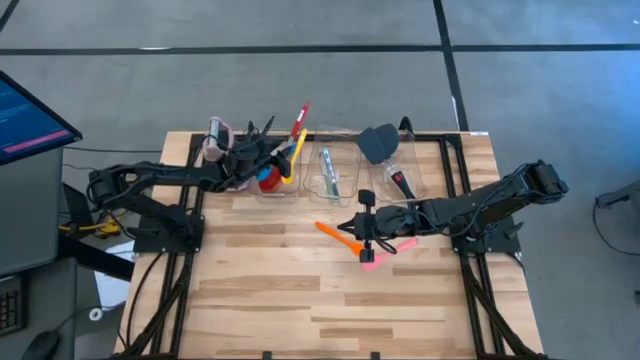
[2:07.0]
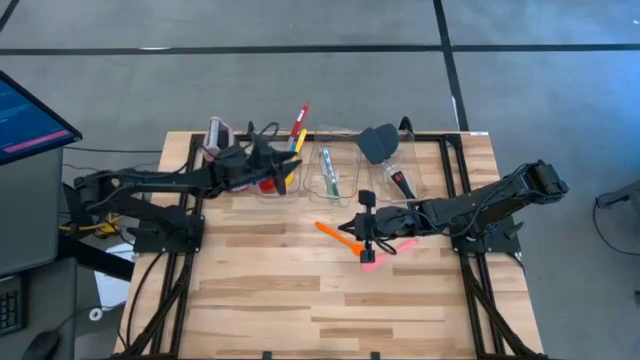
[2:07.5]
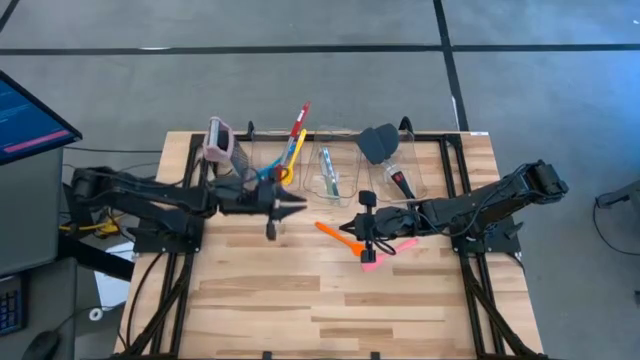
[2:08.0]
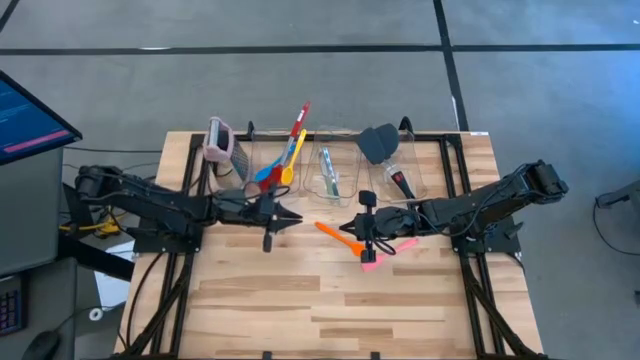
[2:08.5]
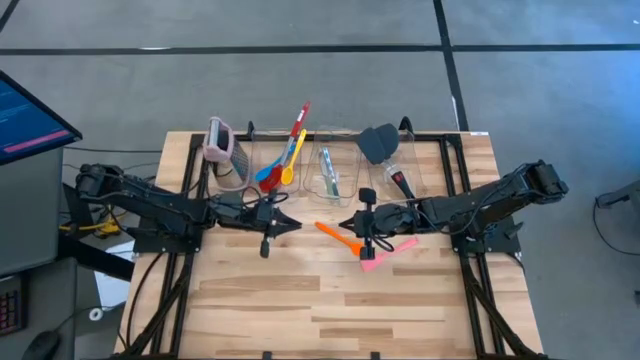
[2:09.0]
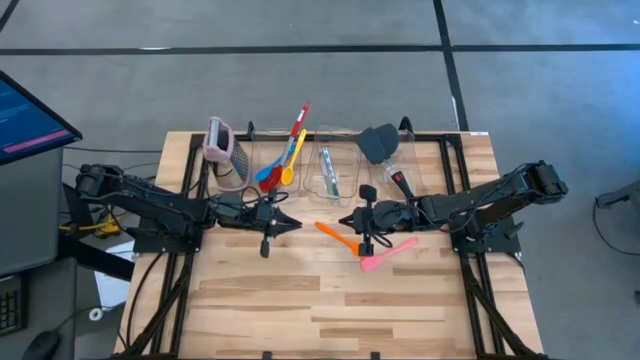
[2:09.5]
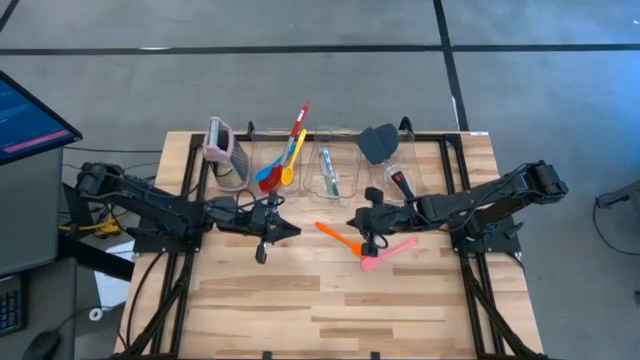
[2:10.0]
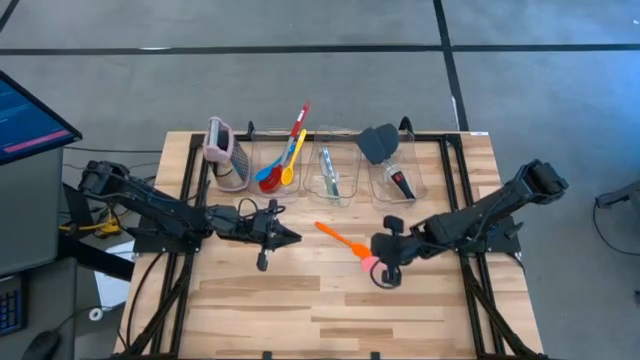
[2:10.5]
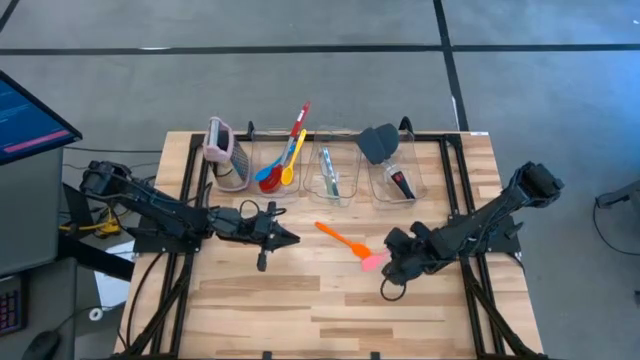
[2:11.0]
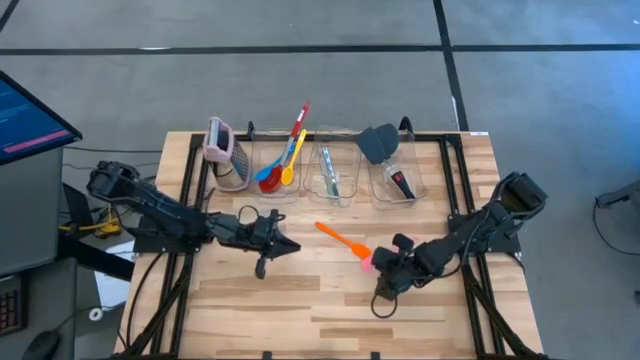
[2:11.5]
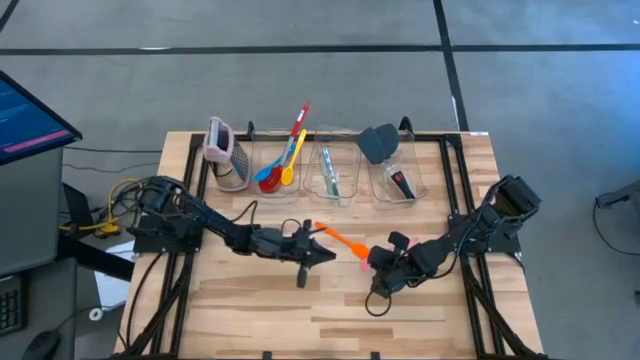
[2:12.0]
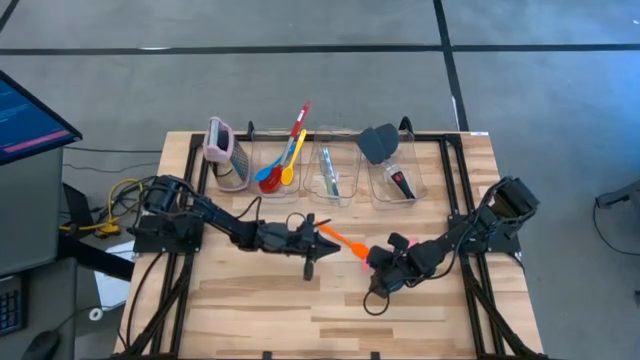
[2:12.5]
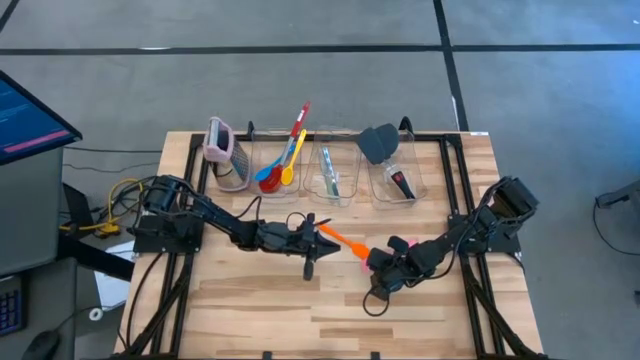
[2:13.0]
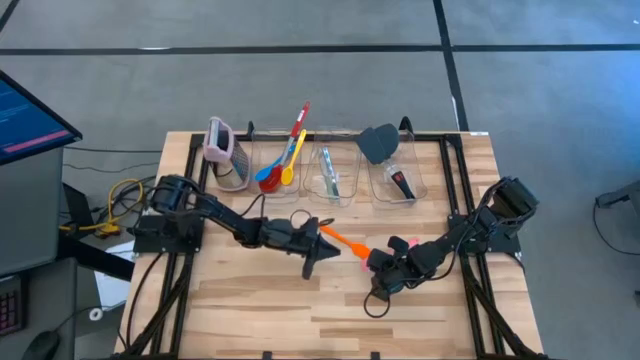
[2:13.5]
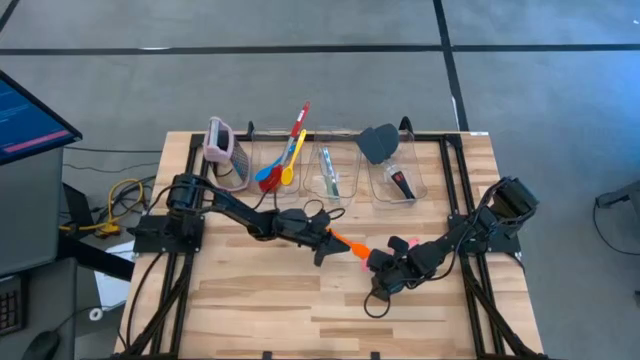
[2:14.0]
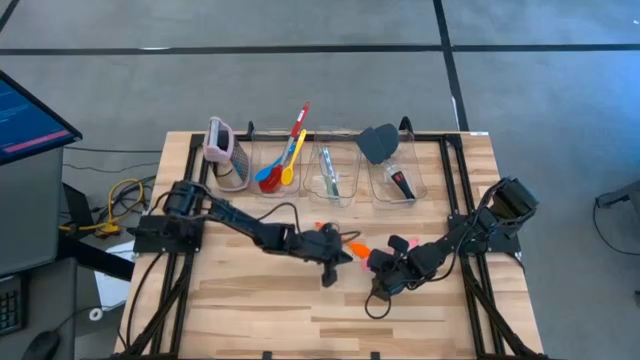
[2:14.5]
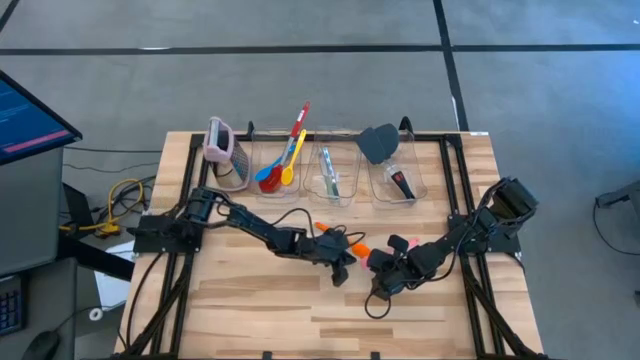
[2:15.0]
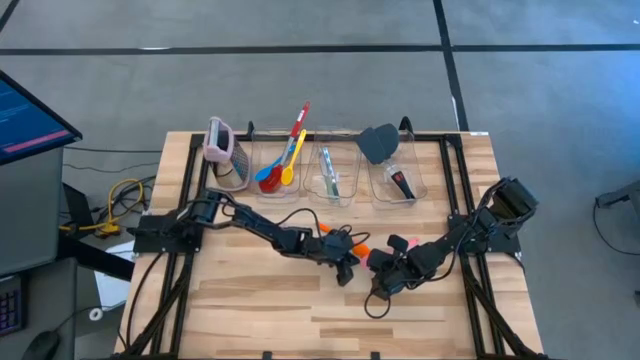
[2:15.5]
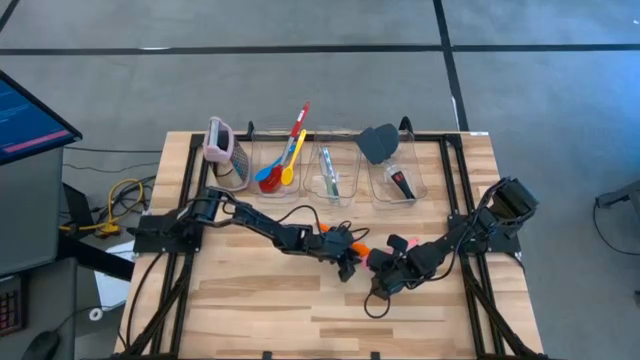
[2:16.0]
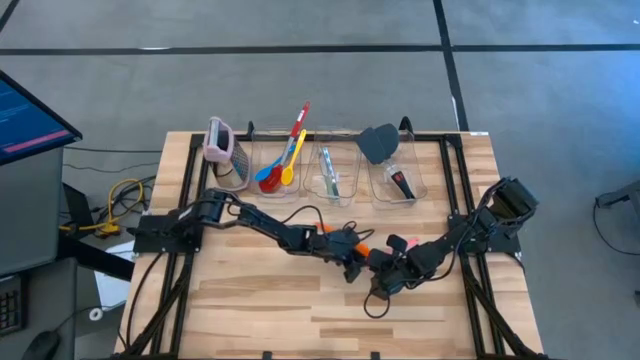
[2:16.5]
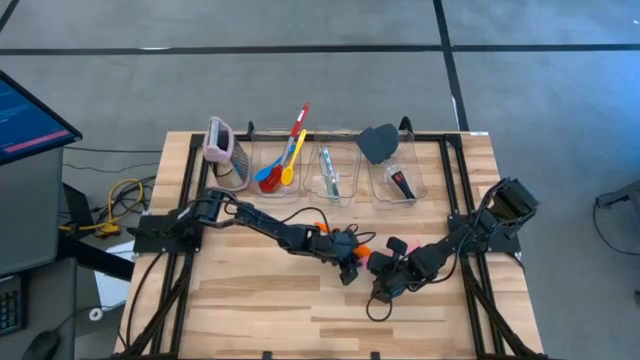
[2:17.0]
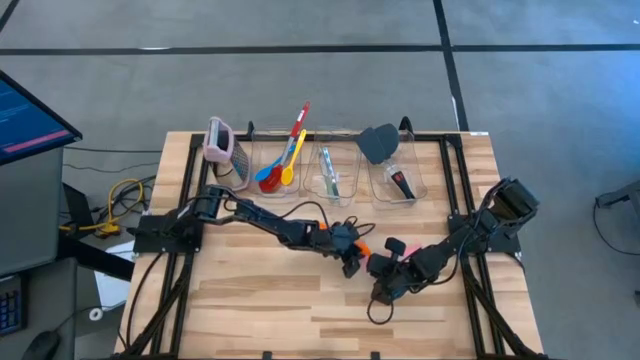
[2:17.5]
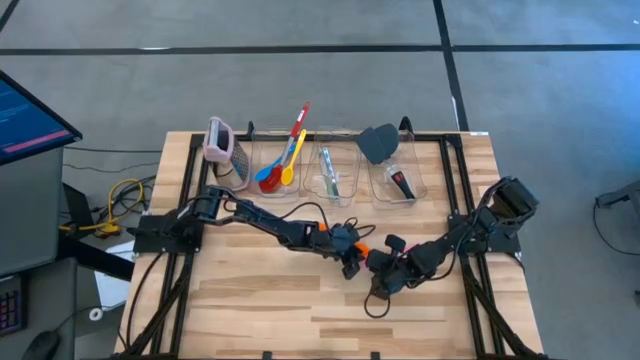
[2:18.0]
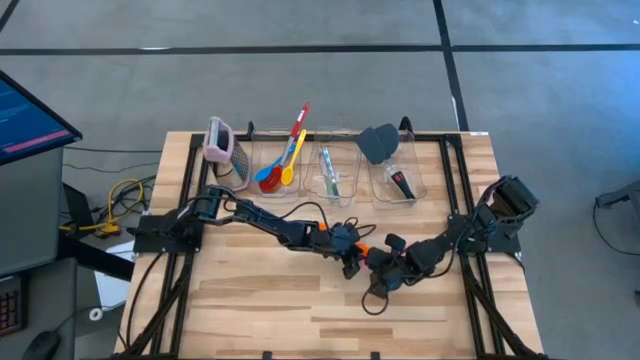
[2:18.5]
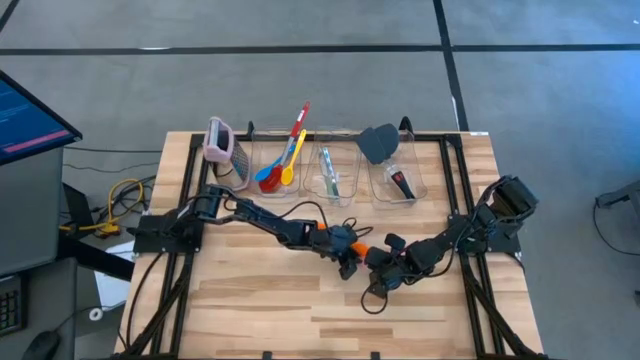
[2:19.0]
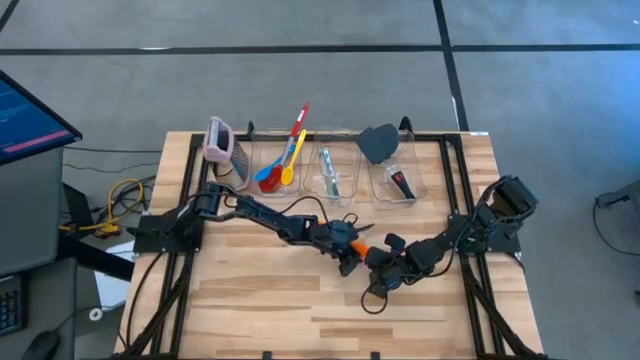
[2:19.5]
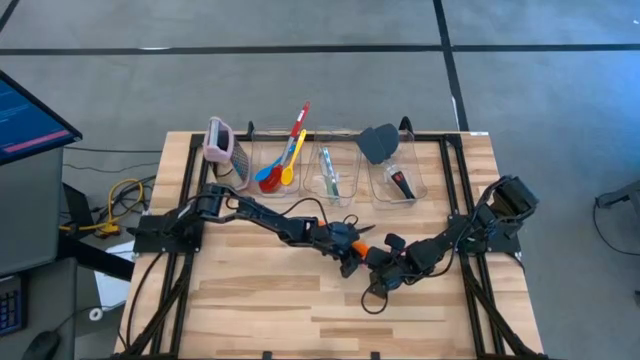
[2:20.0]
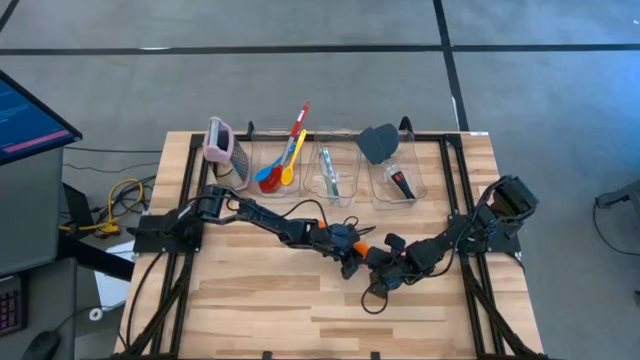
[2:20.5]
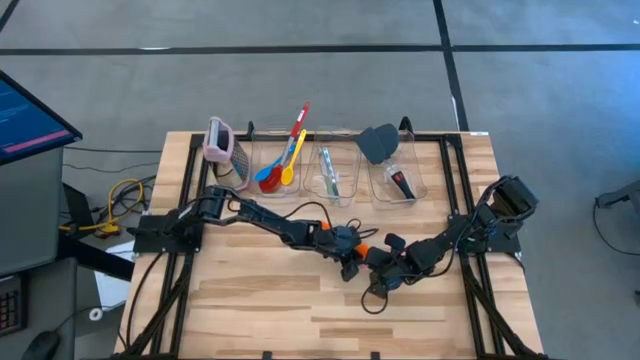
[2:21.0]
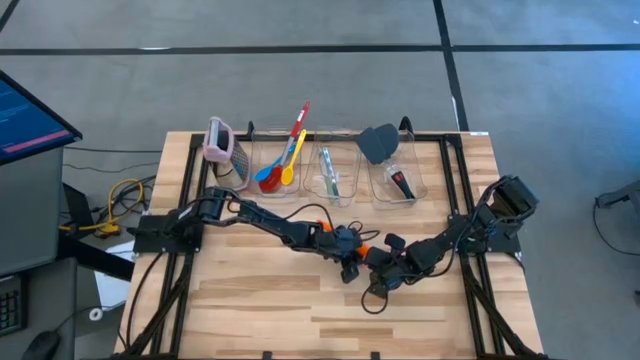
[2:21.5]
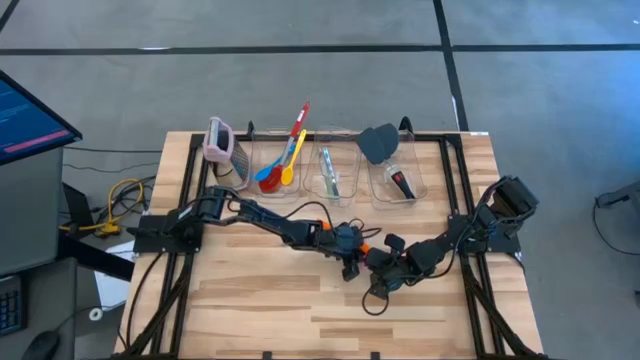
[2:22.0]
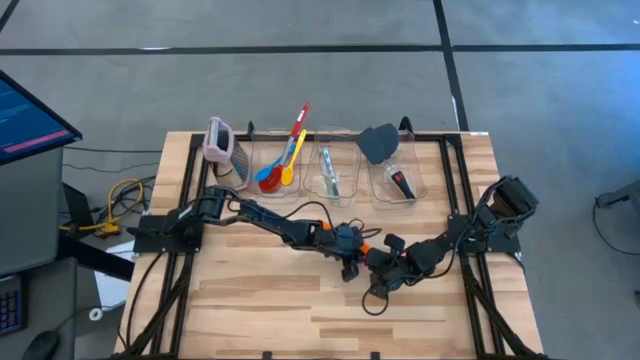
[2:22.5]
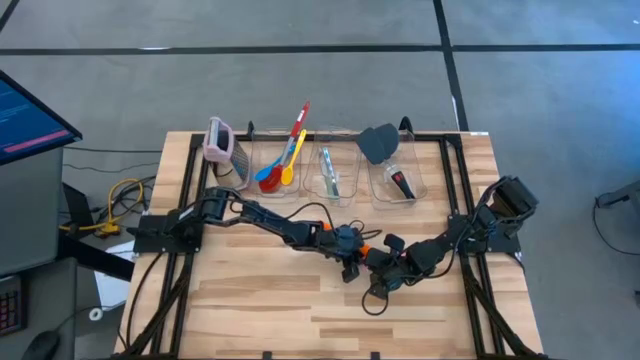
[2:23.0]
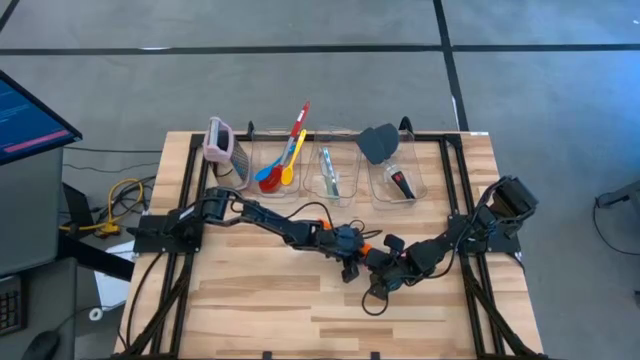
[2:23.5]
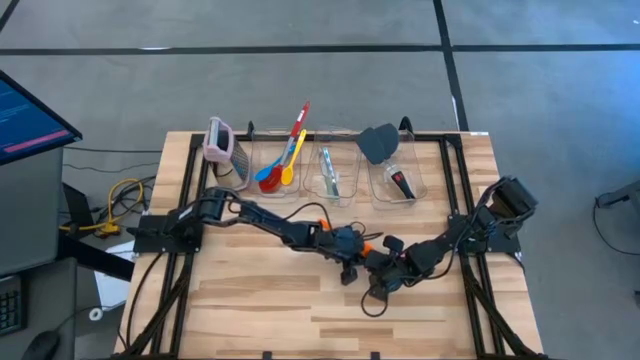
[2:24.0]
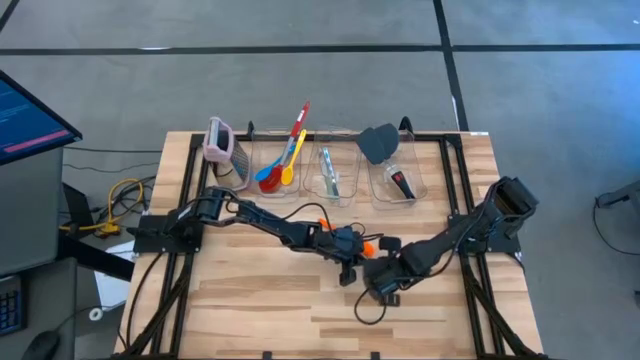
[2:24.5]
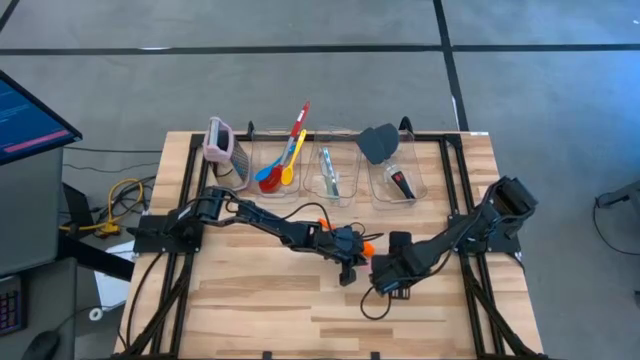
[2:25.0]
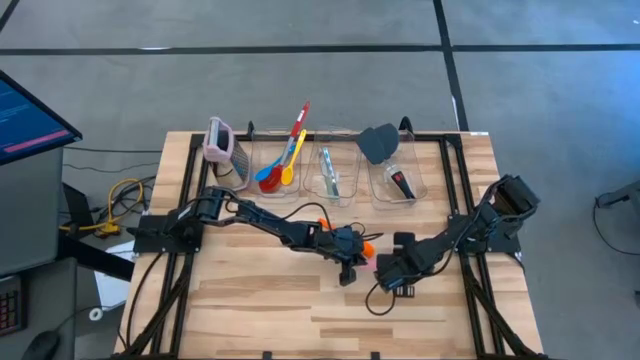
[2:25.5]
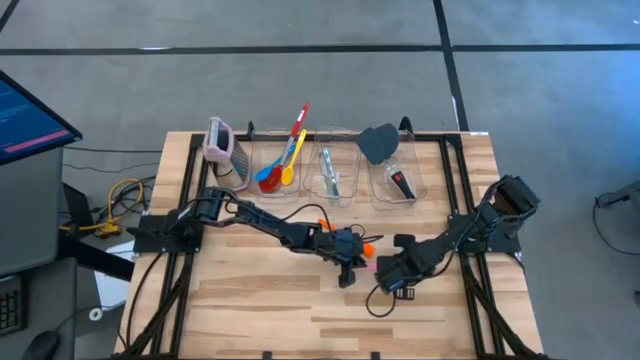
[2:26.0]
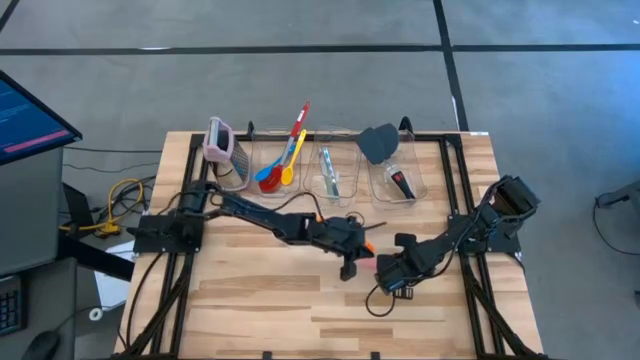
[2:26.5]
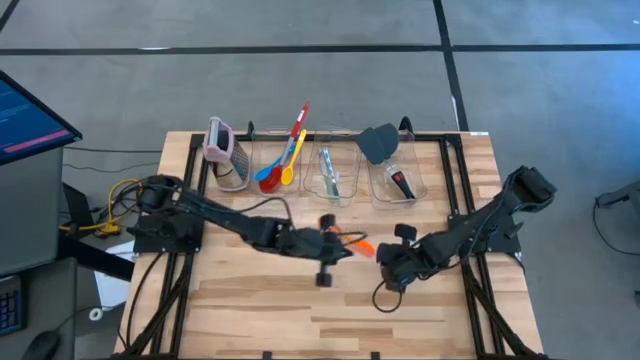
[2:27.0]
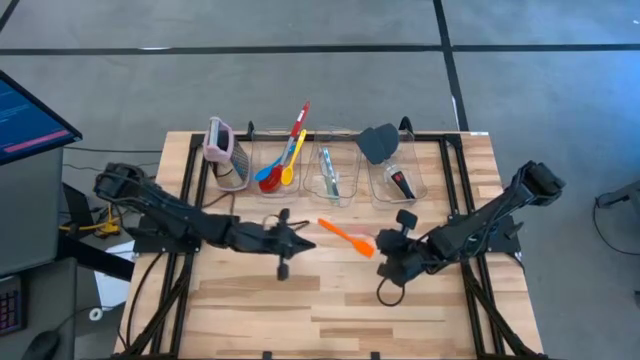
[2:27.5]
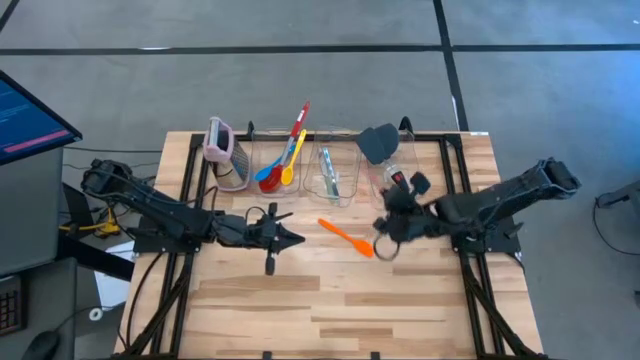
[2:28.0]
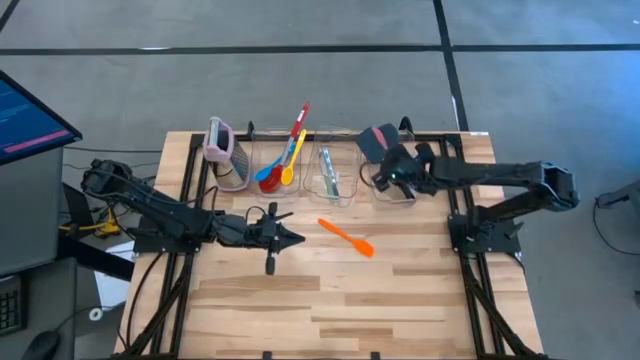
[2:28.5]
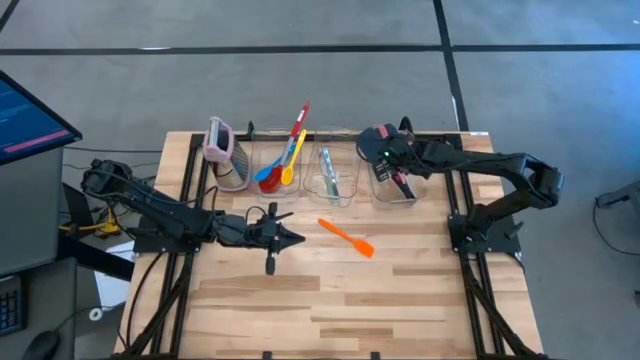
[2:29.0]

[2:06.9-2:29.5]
Task: Pick & Place Kitchen Items
Put the pink spatula into the right transparent bin
